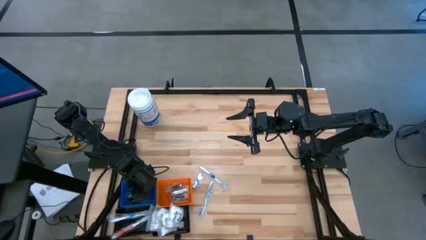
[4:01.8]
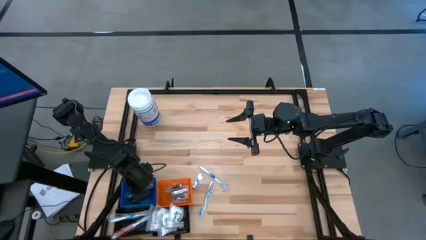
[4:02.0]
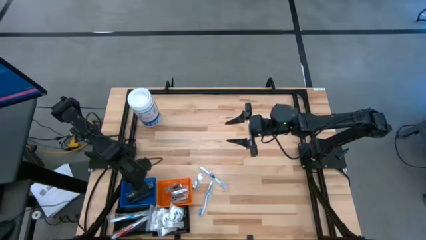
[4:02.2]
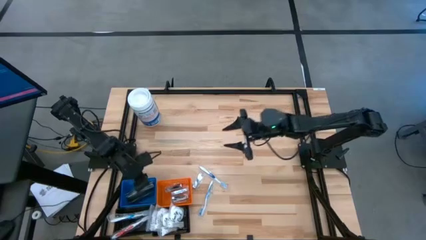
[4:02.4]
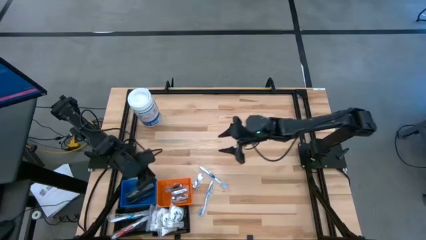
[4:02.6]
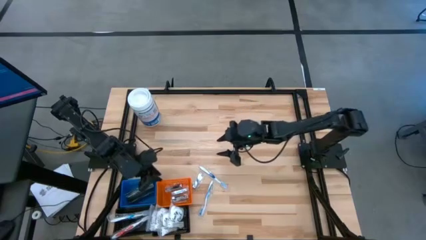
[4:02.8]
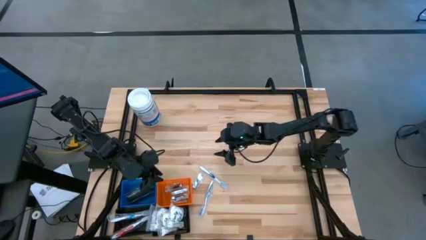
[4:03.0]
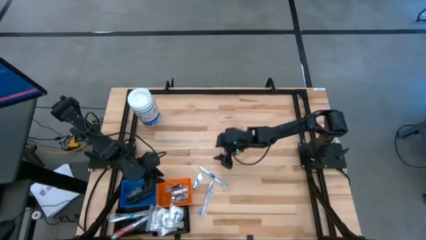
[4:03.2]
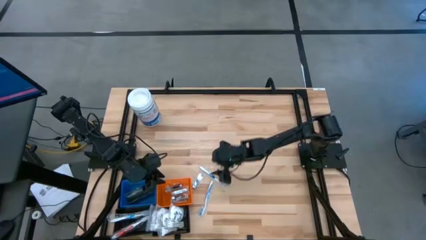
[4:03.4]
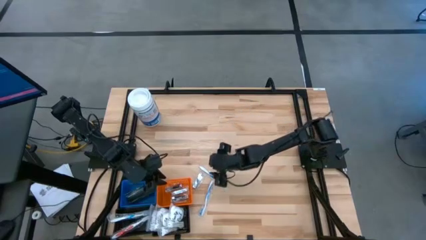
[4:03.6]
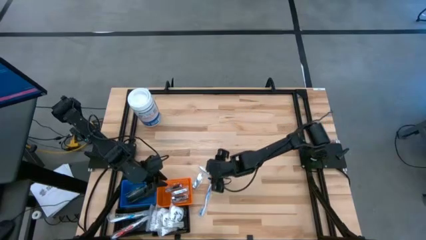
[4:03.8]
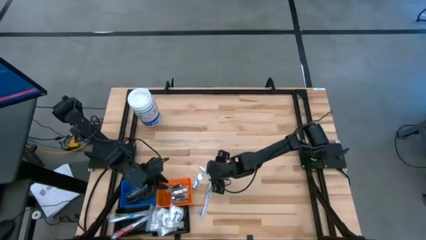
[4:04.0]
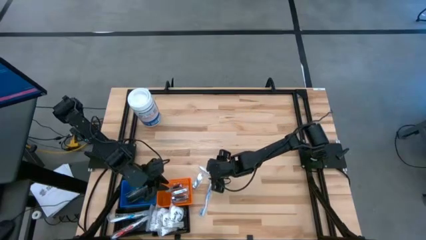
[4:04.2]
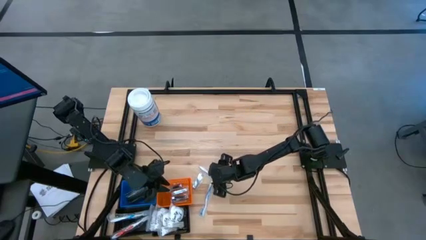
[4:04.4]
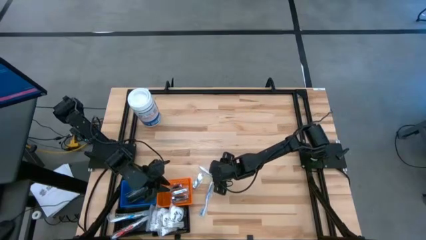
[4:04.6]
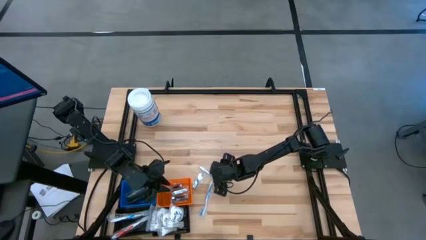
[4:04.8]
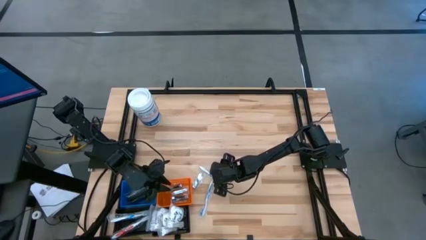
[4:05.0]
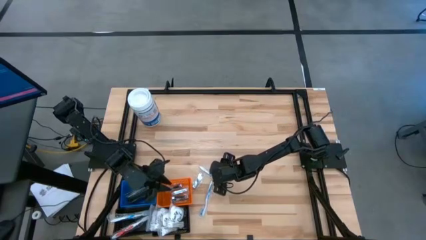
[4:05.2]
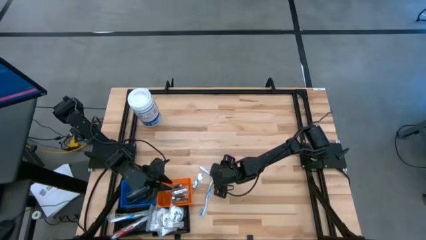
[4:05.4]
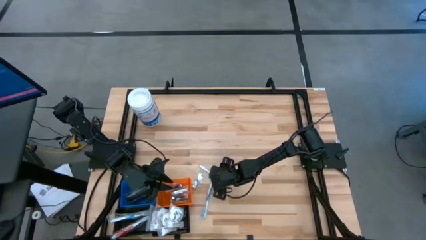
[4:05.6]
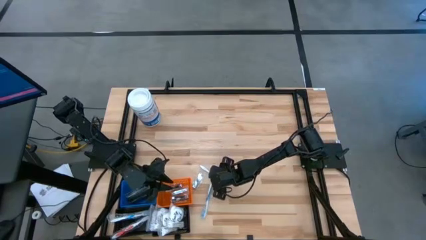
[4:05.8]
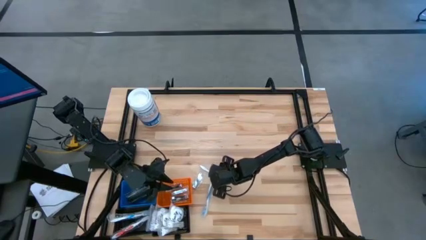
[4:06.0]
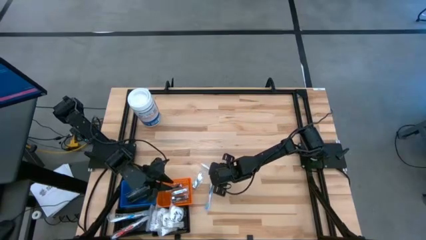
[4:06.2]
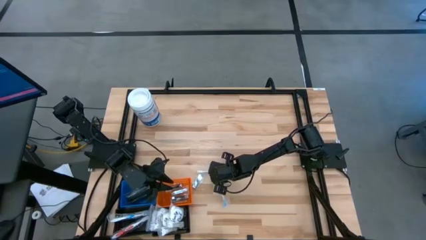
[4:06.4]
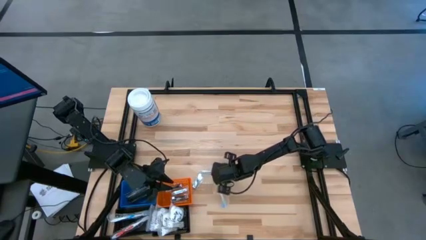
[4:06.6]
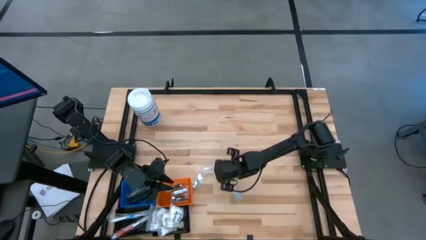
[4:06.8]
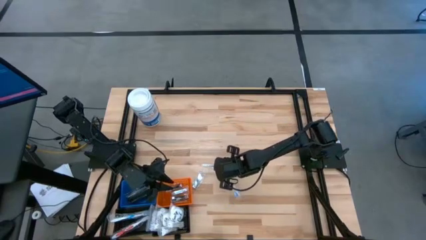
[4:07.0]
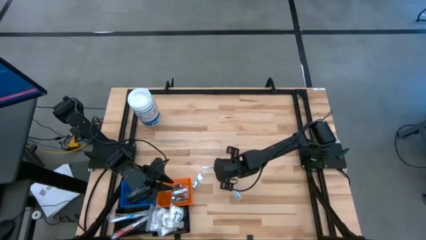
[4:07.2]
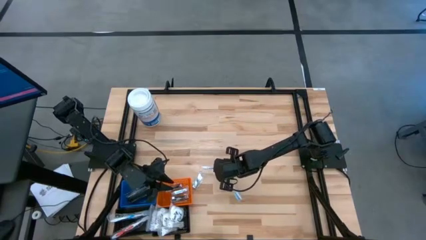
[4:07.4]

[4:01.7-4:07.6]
Task: Pick & Place Travel size toiletries
Put the top blue toothbrush into the left black basket

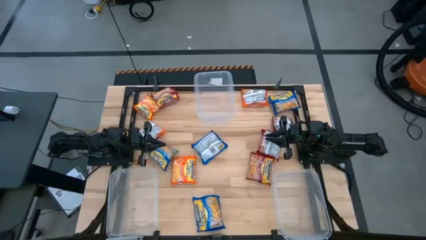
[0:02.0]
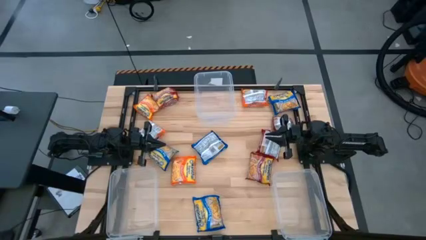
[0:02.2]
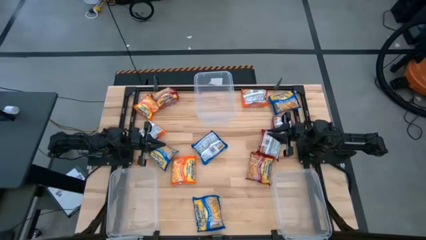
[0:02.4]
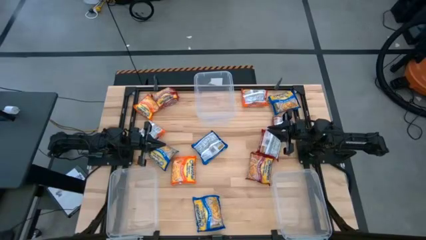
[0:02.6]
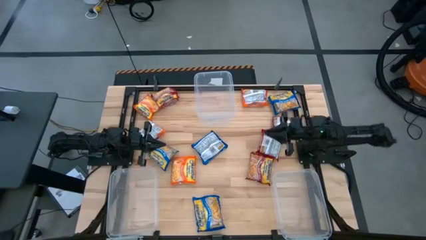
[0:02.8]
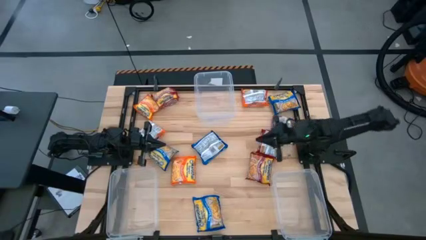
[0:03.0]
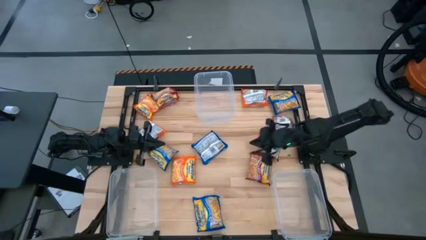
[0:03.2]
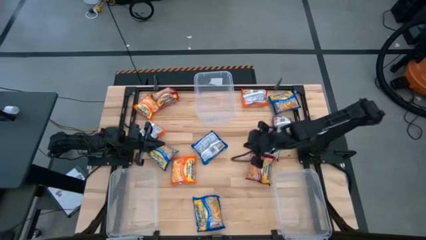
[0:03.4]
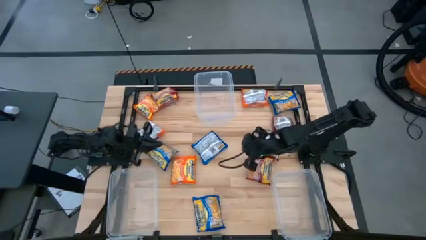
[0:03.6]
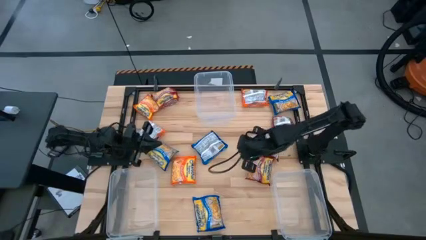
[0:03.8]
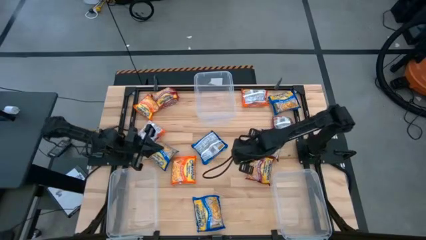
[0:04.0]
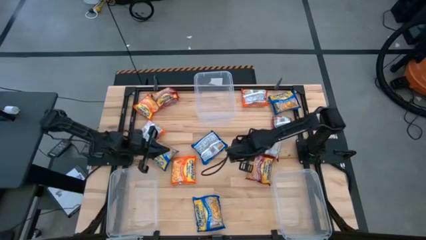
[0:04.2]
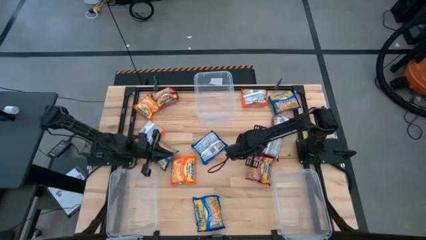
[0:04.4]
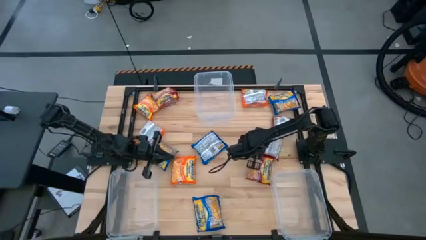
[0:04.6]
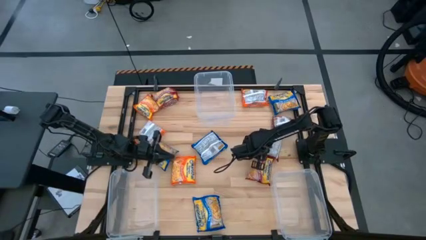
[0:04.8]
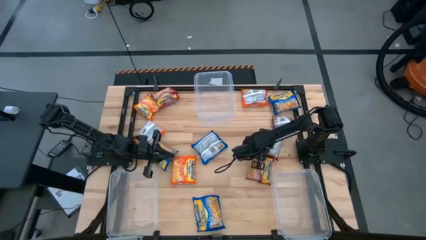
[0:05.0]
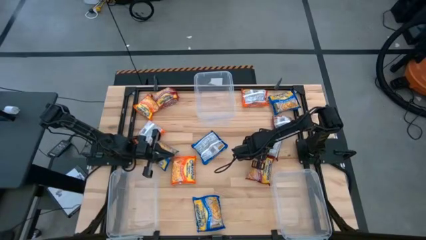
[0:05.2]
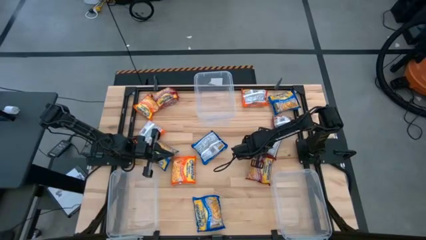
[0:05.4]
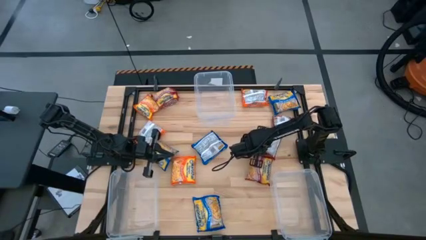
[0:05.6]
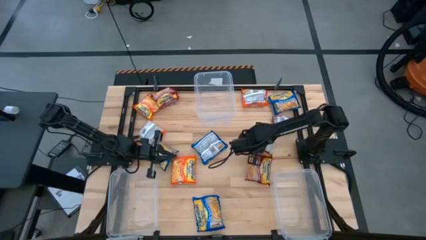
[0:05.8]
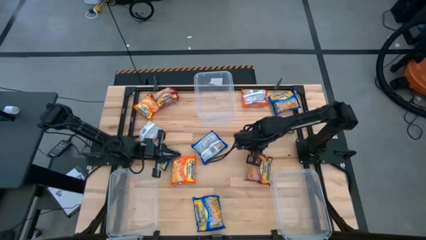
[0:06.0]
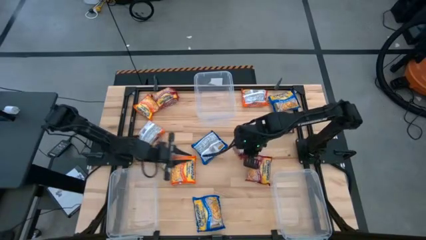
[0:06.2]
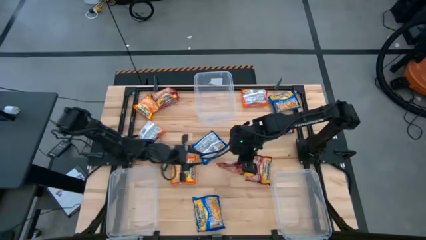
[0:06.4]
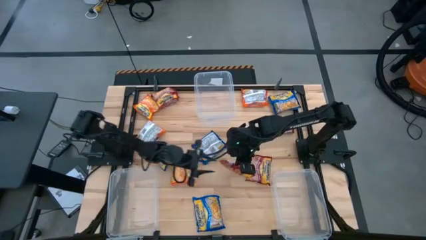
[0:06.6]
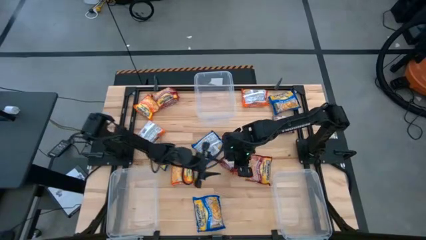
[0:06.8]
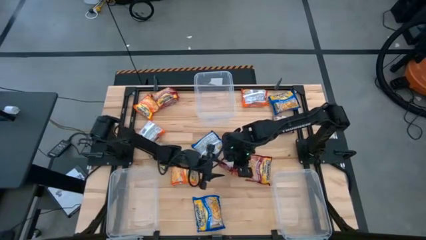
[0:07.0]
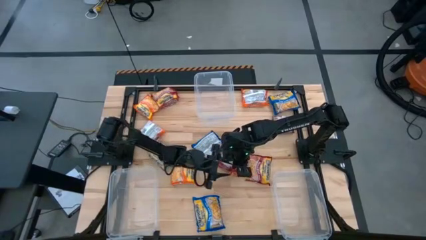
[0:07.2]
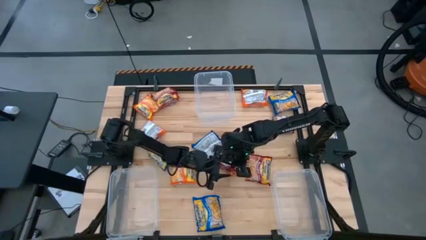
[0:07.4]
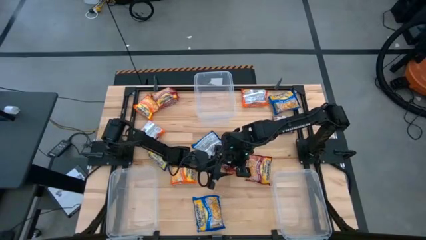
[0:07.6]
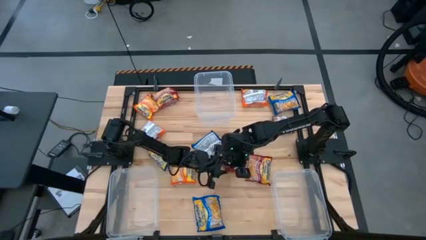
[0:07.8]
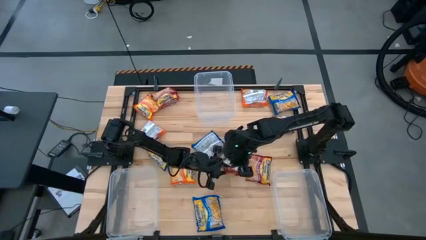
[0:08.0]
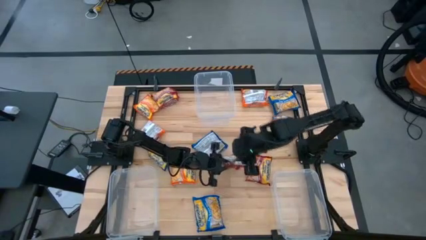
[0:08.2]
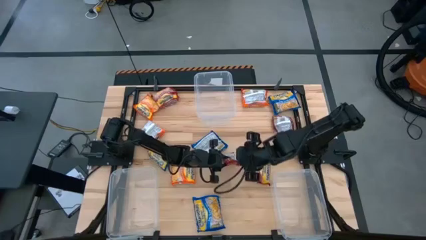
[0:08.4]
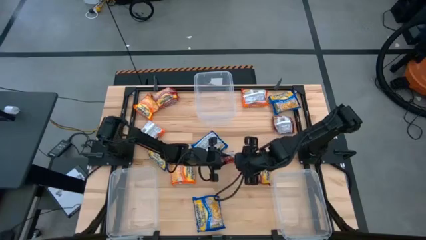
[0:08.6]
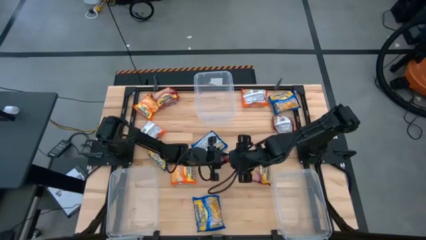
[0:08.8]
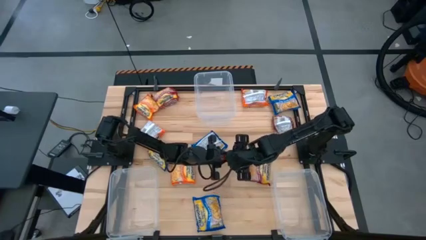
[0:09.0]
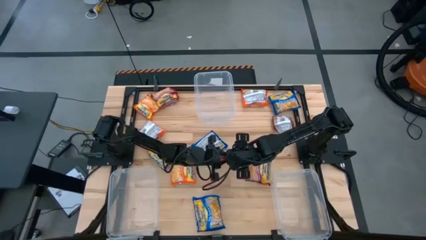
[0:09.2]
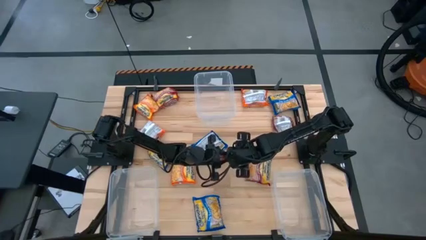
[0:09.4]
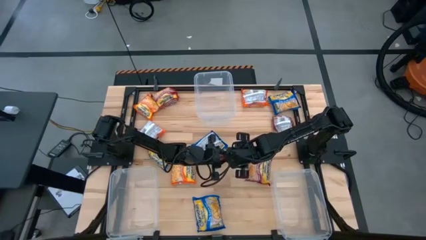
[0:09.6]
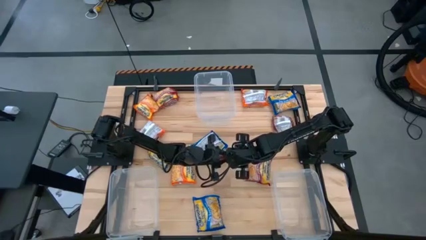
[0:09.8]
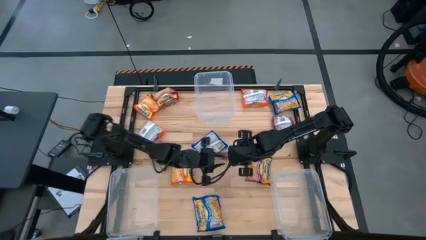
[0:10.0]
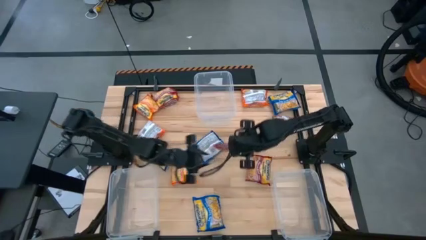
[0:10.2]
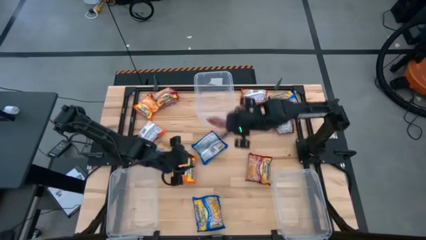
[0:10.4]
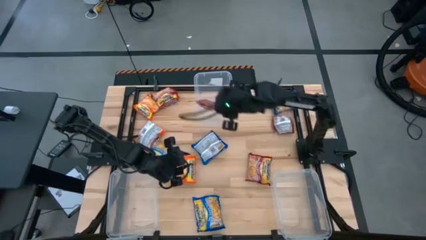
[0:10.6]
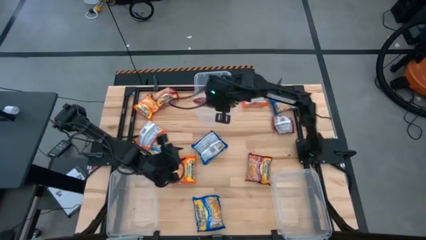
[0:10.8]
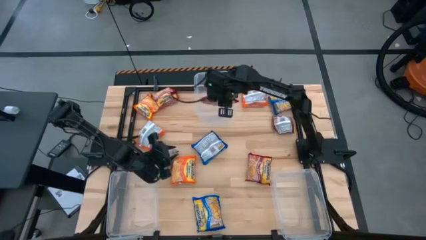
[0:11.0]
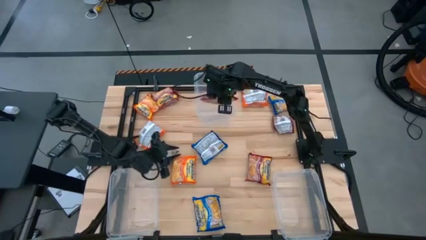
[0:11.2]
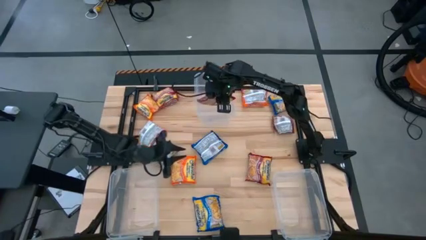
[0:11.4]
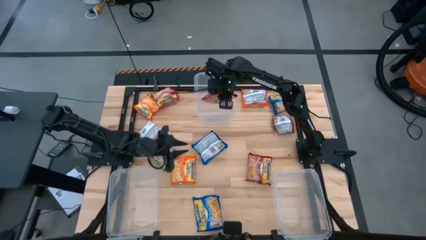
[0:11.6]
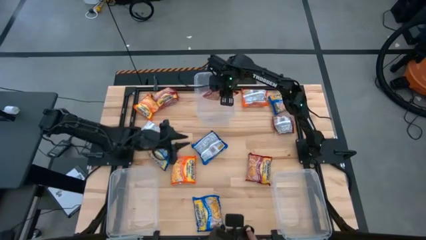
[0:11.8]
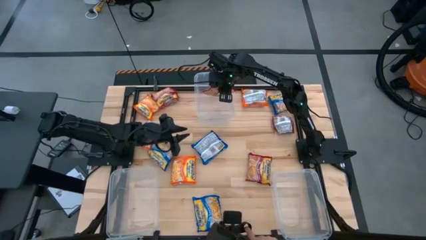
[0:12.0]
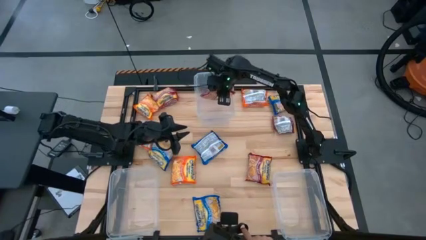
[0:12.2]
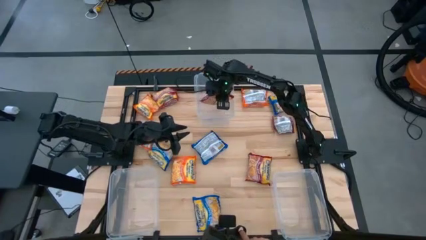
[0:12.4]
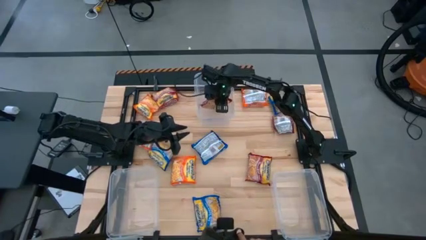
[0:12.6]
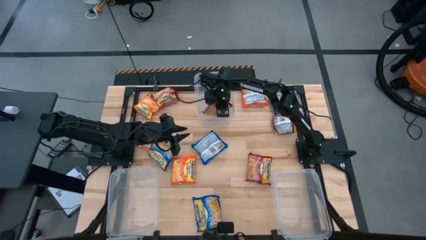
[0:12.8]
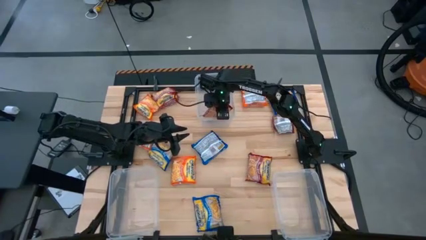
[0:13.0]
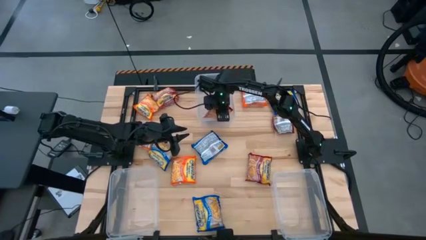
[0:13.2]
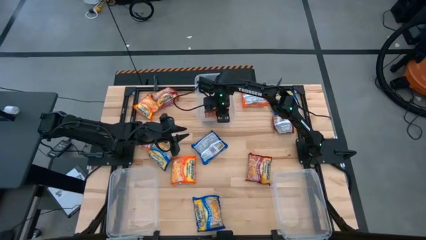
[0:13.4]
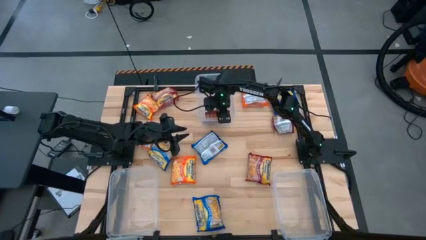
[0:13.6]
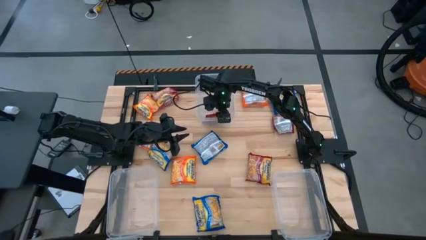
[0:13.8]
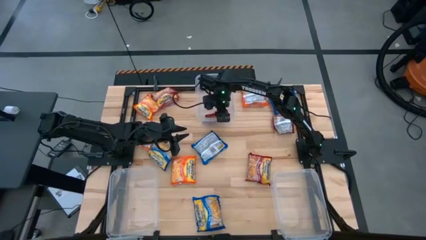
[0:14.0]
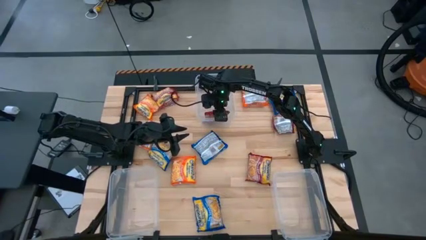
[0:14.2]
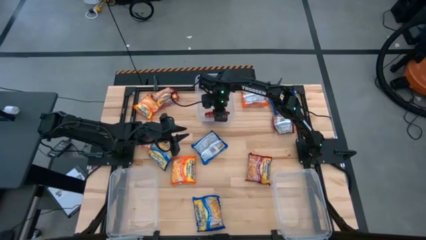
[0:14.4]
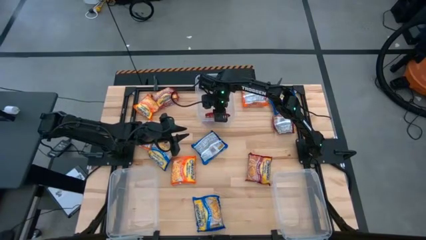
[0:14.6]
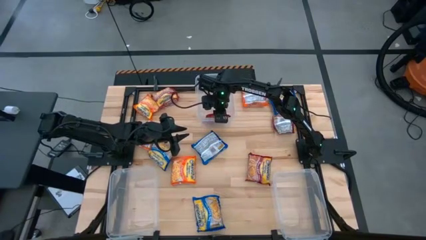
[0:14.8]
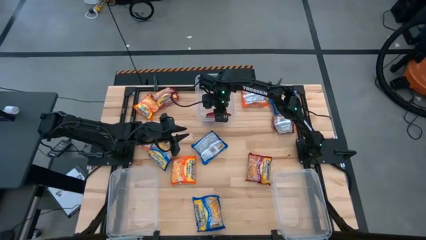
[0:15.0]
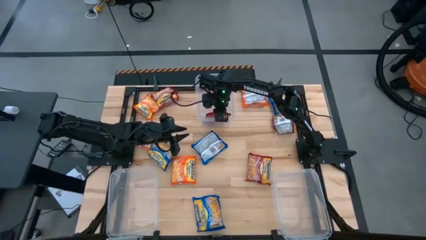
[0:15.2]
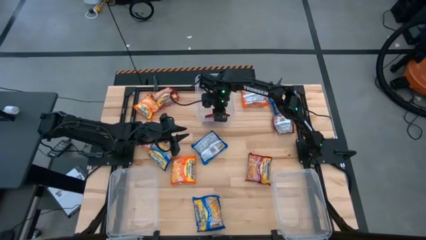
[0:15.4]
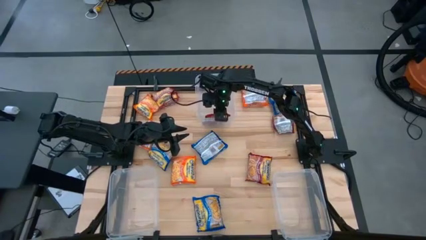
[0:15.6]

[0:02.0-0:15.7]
Task: Sort Maruchan noodles
Put the red noodle pack into the top transparent bin
